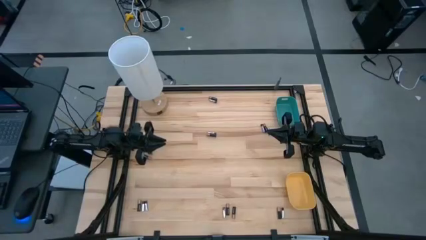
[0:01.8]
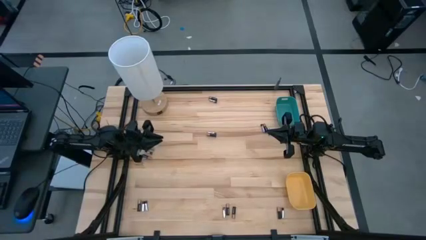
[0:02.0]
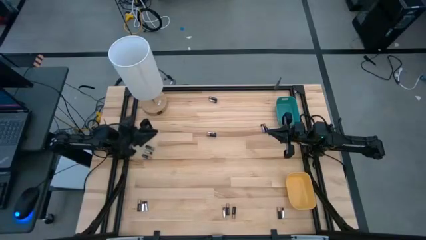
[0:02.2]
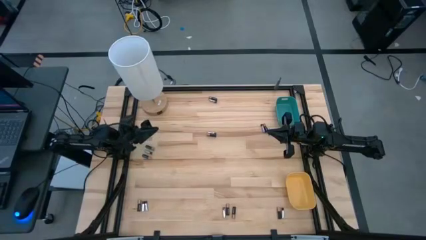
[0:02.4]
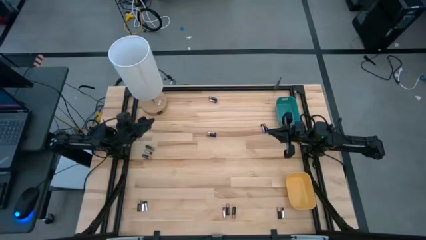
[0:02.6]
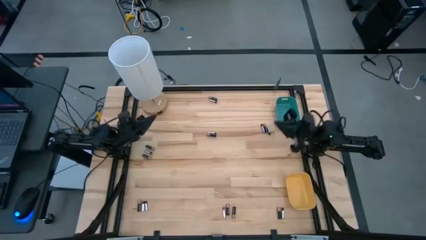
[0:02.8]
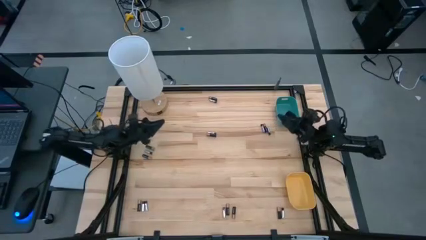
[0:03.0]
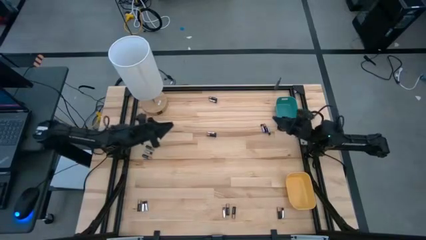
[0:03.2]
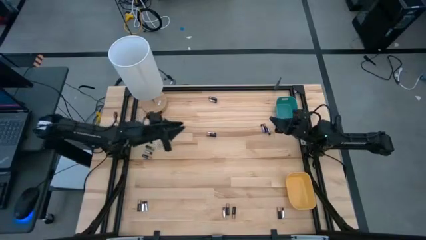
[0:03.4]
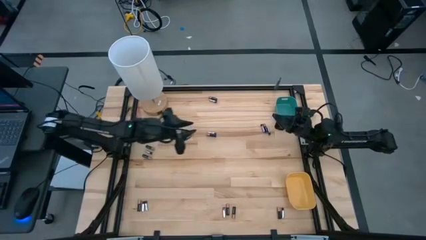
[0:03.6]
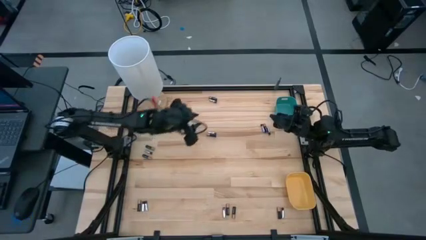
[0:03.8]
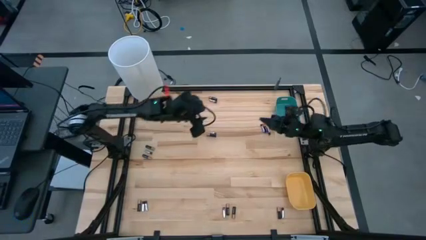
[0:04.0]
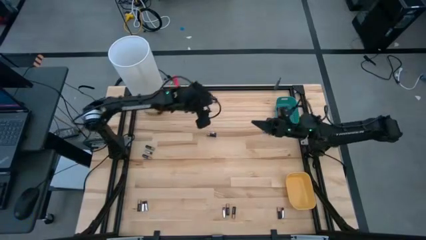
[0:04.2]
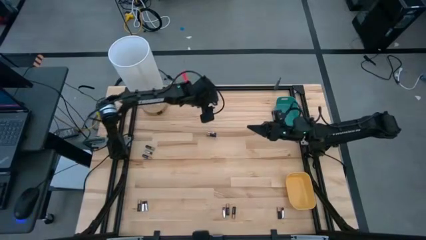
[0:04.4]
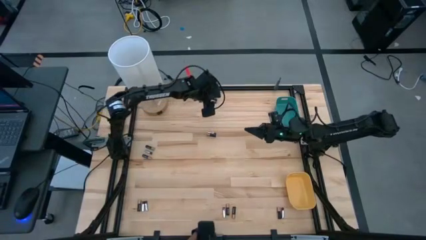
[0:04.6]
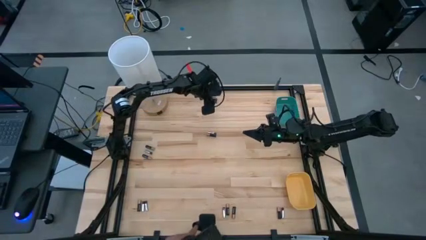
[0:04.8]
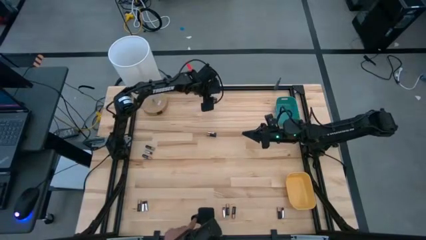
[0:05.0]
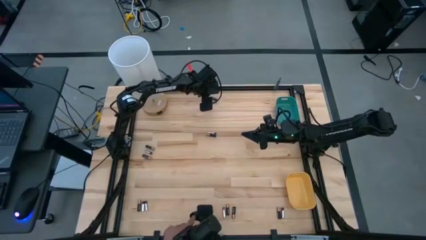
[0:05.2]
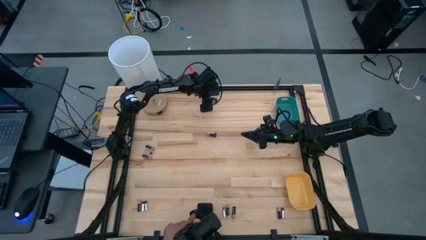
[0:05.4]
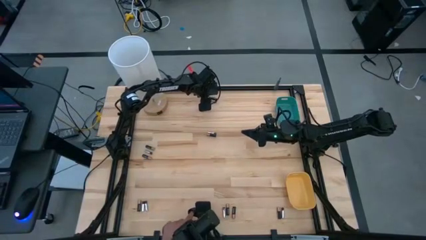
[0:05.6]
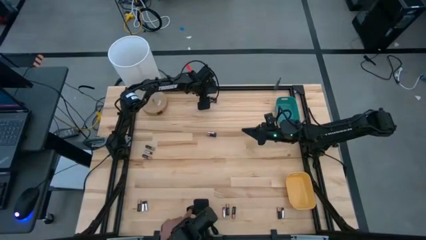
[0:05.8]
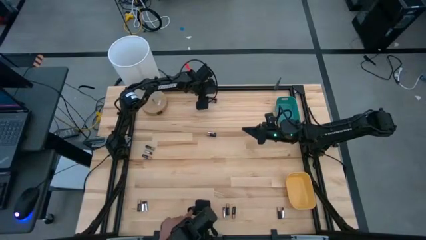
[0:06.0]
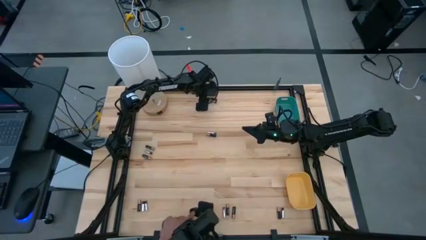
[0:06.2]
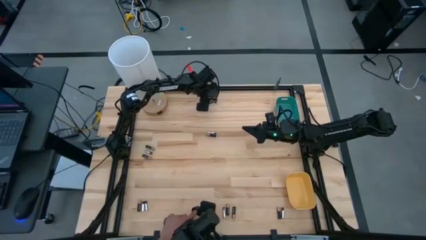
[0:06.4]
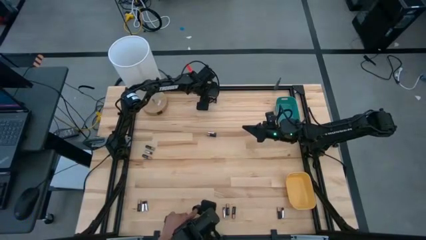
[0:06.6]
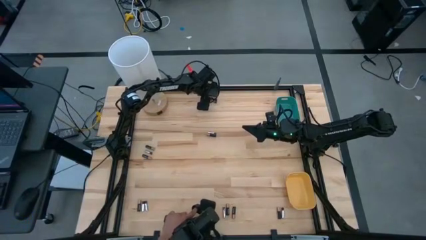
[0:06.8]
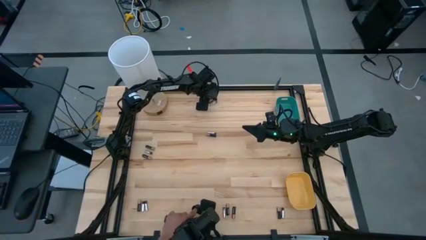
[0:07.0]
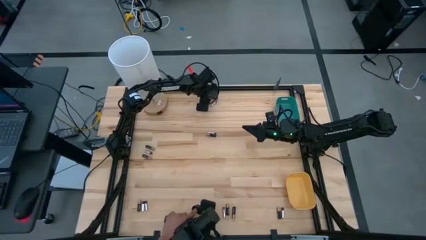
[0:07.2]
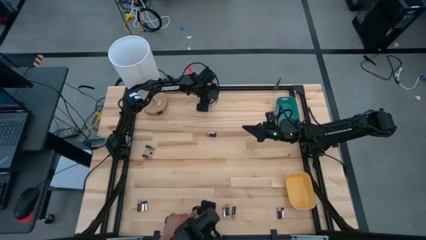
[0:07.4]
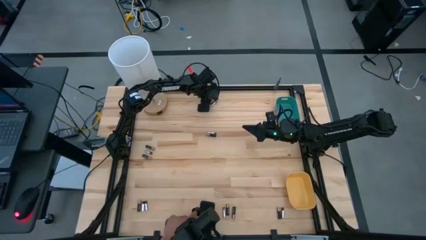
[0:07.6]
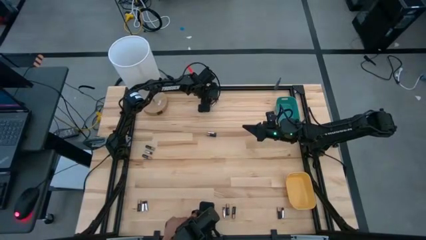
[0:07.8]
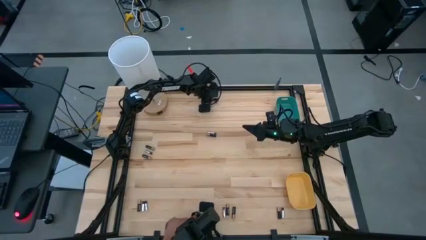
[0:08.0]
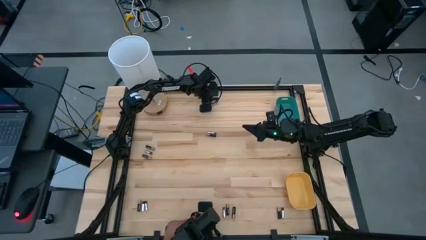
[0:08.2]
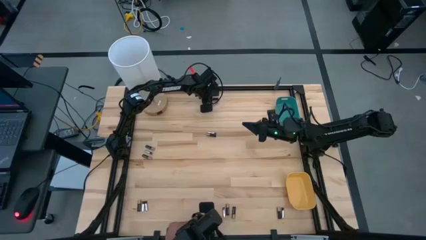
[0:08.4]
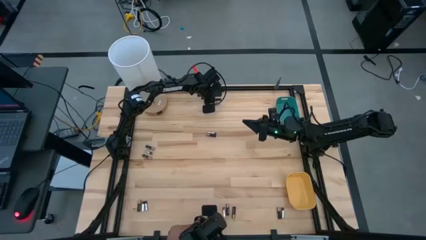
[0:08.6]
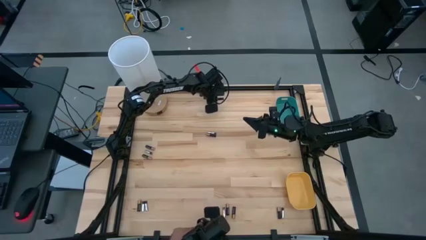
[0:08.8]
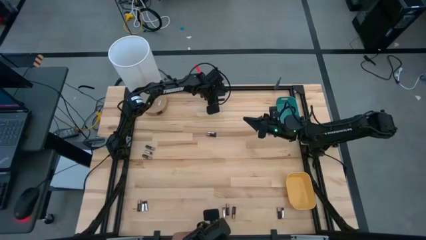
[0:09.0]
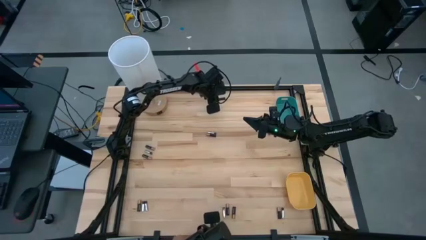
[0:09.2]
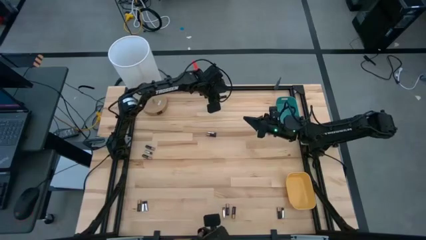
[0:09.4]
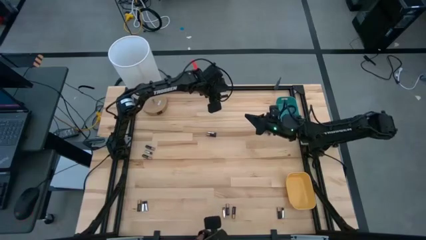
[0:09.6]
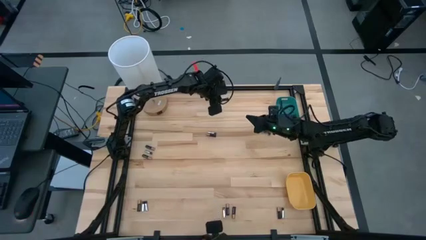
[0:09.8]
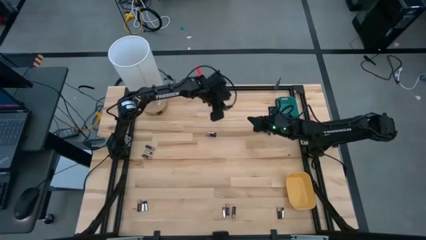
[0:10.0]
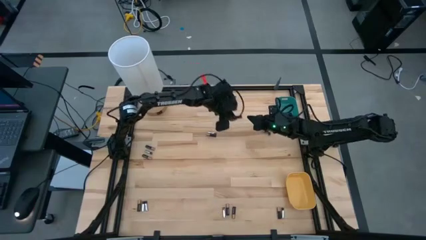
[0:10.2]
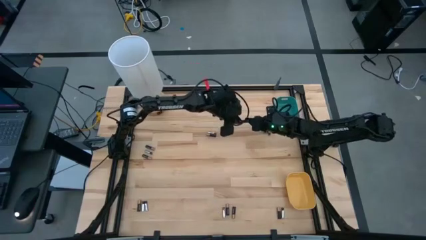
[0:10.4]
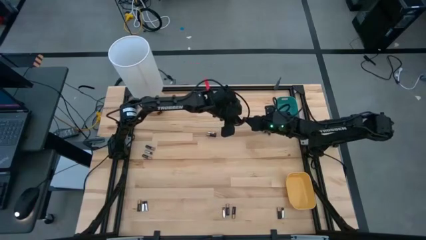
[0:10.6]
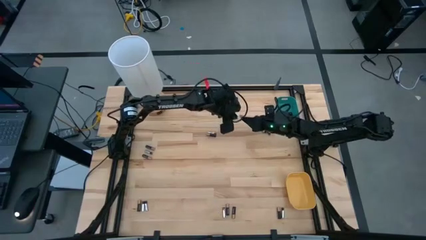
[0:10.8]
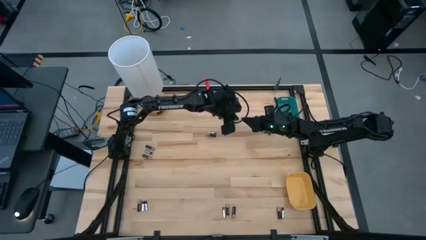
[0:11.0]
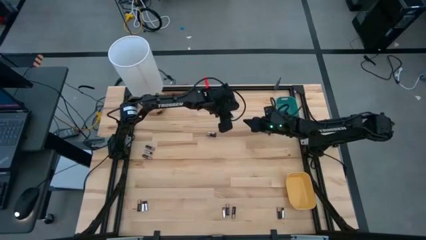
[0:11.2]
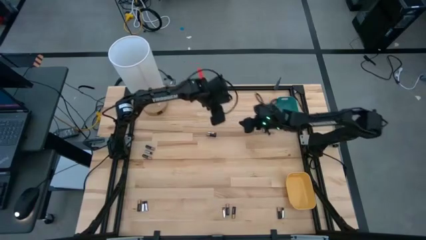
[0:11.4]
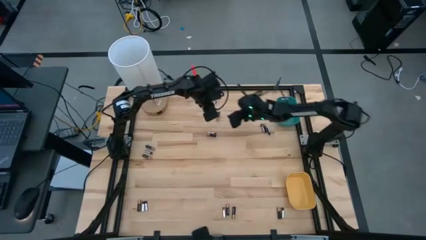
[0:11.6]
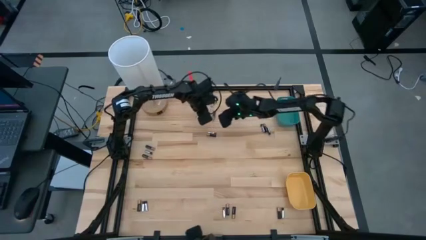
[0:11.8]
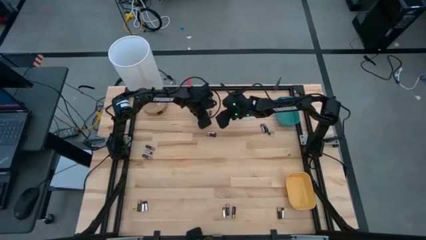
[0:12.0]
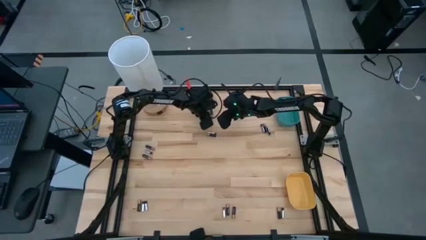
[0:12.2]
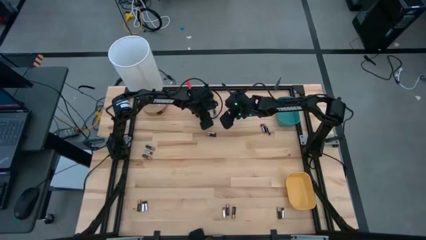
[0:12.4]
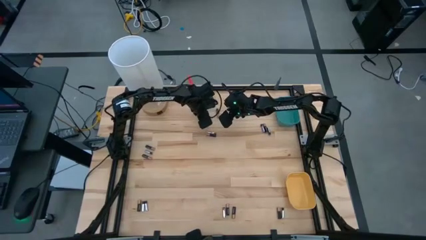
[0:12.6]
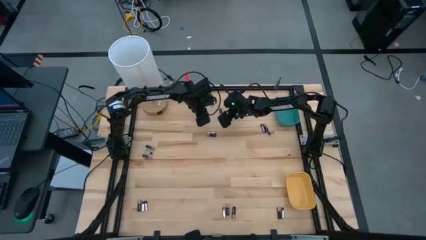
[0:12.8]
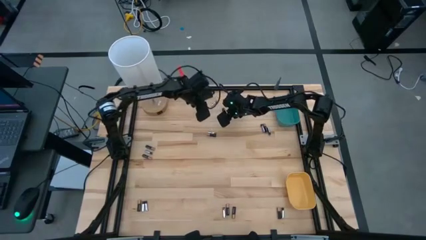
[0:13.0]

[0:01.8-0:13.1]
Task: Sort batteries
Put the black battery into the blue bin

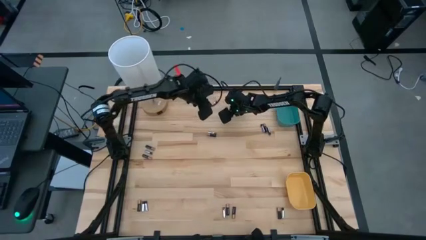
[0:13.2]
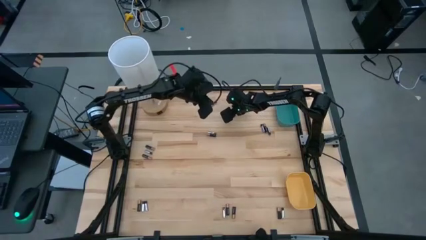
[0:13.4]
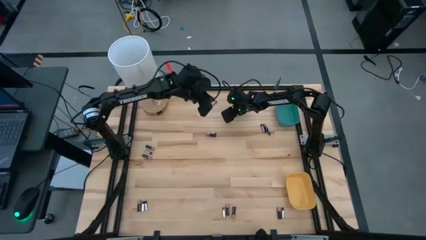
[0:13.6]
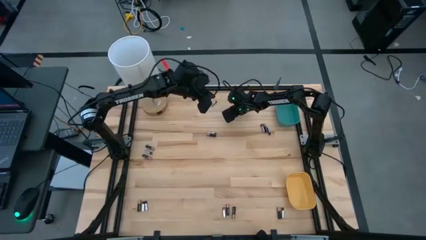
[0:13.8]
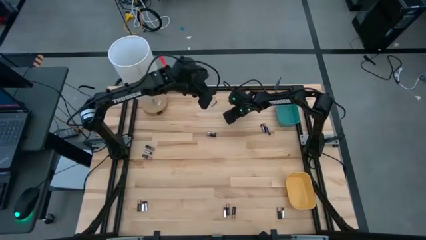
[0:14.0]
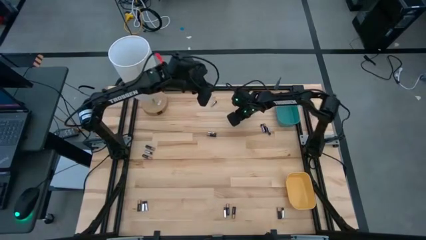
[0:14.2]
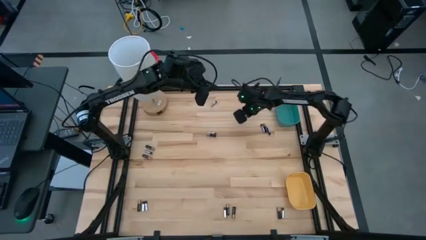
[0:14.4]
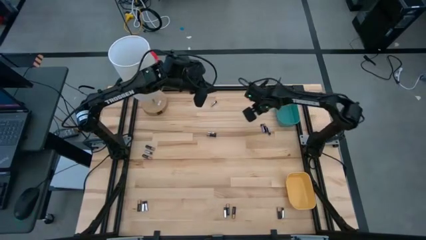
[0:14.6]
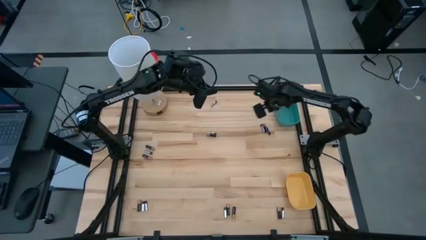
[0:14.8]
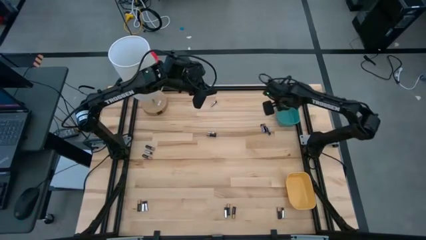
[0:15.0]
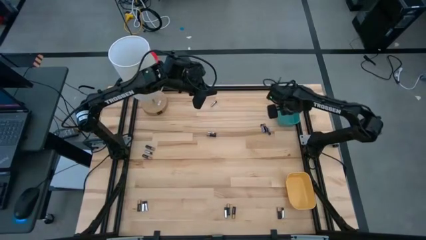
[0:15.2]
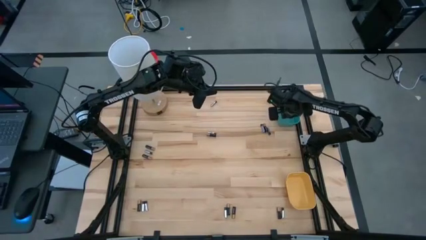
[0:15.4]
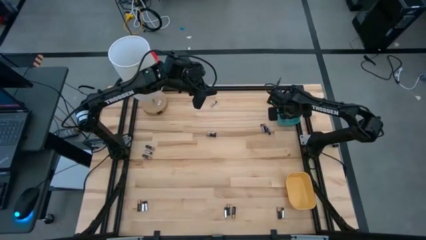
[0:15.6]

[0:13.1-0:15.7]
Put the black battery into the blue bin

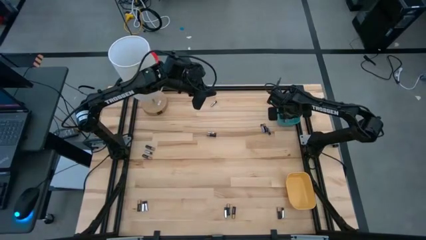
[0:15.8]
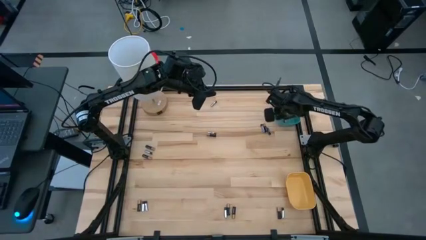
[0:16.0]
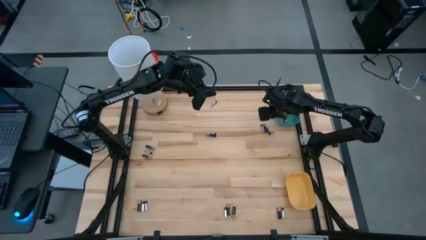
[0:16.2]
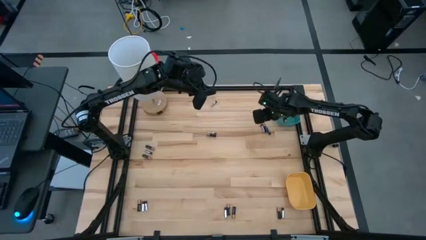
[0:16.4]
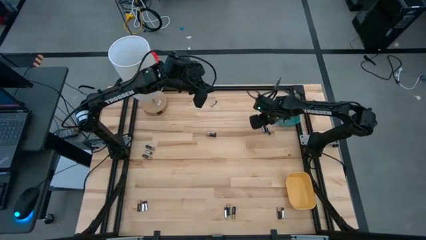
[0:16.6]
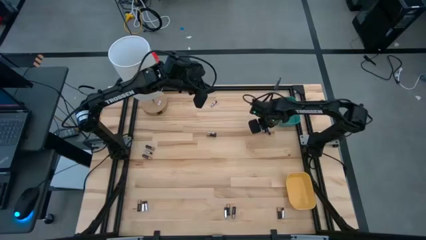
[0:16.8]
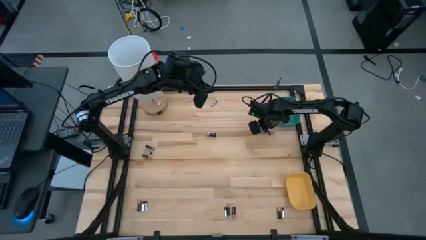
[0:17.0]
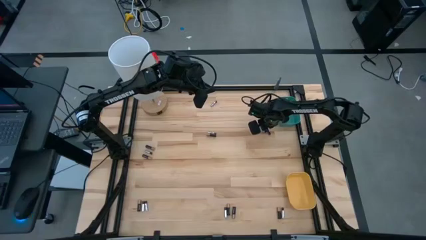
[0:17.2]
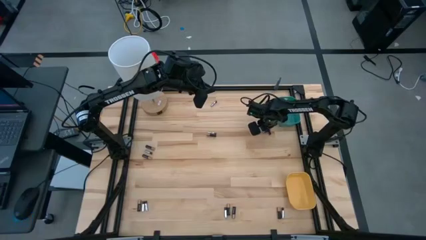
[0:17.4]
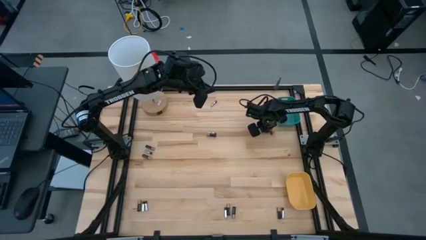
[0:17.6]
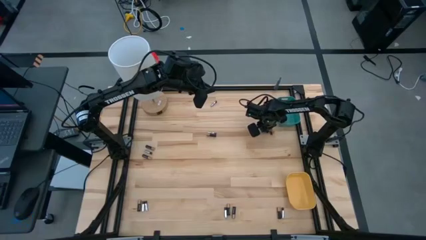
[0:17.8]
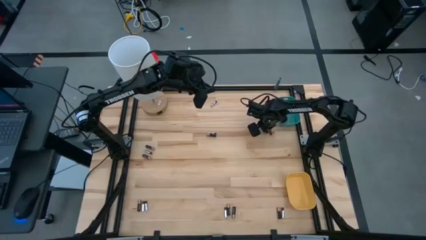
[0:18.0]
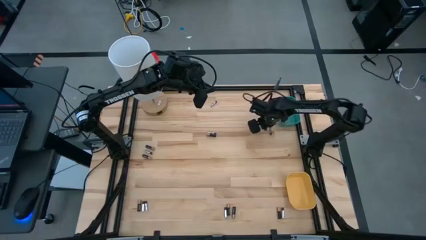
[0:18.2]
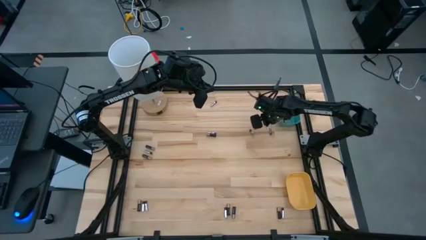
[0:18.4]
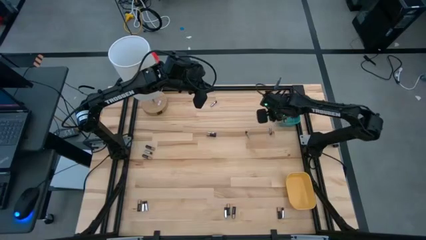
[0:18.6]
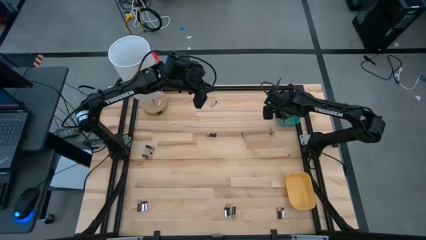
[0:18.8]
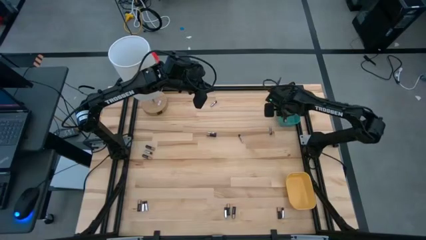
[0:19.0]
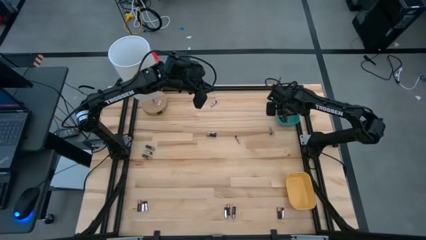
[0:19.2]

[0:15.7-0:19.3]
Put the black battery into the blue bin
